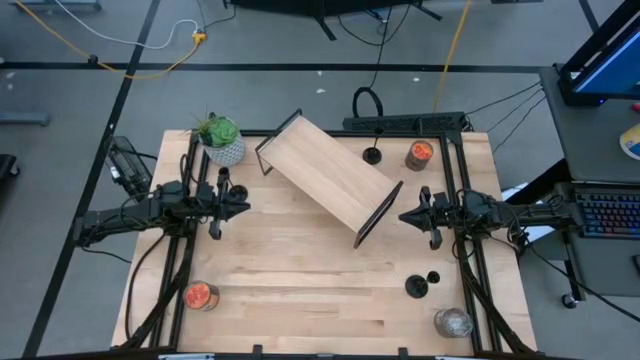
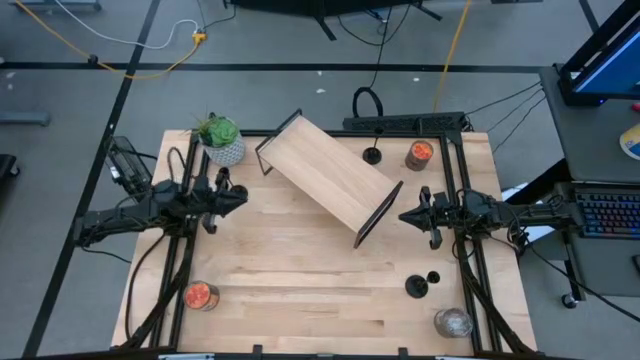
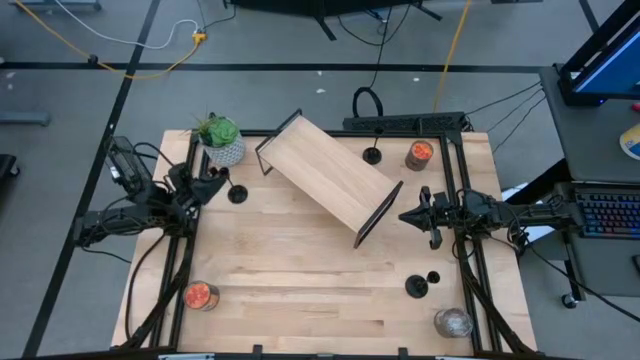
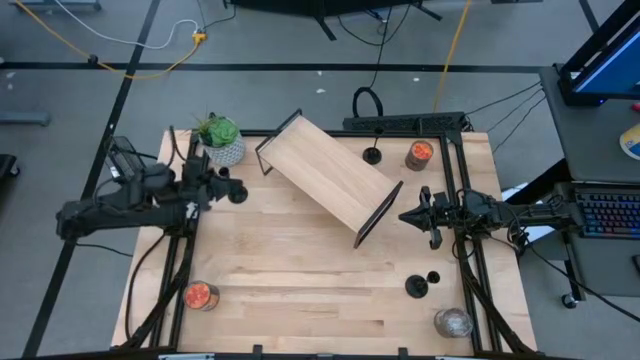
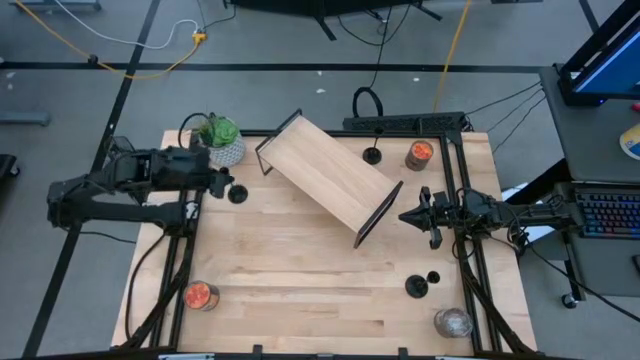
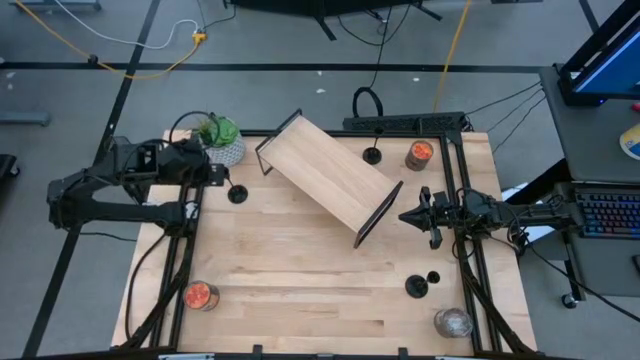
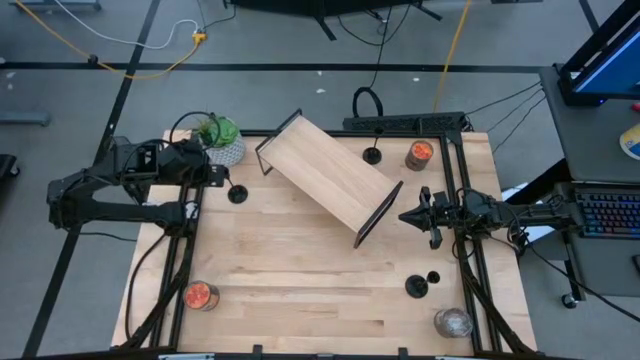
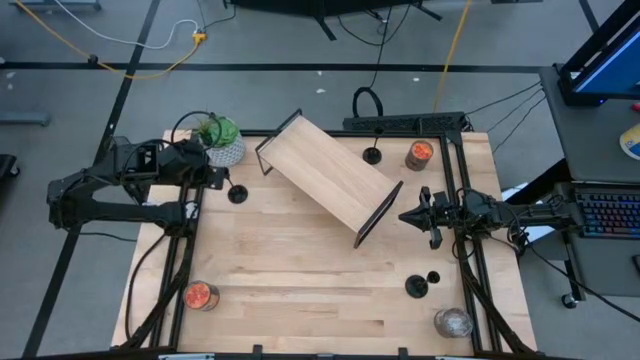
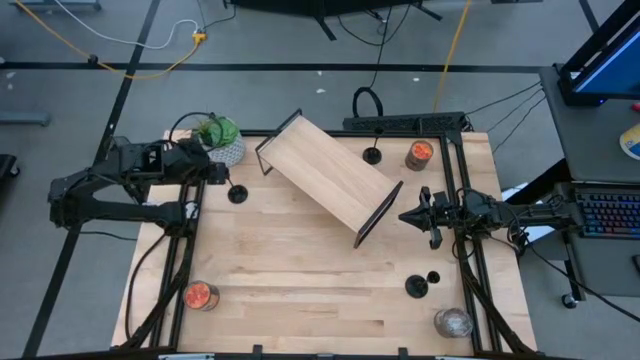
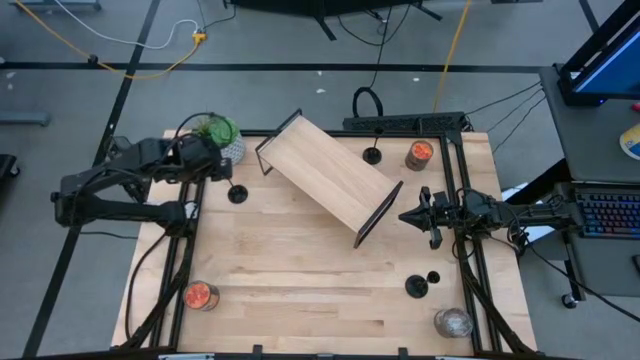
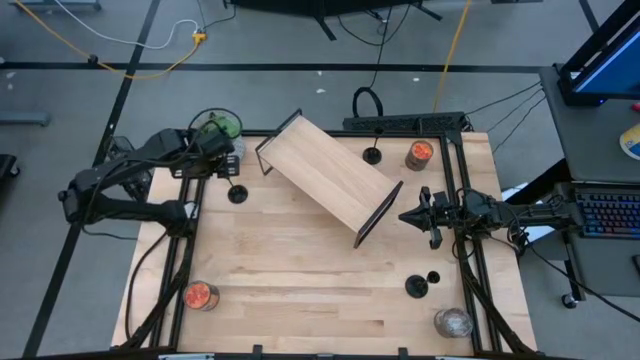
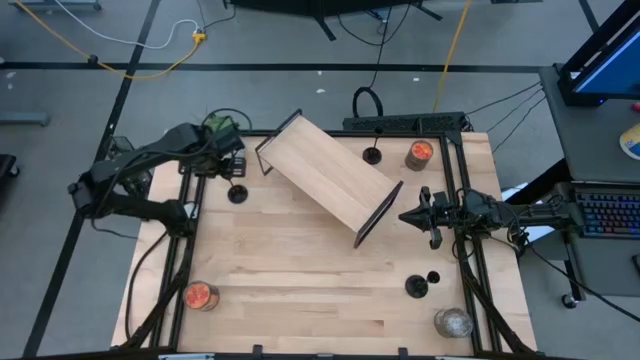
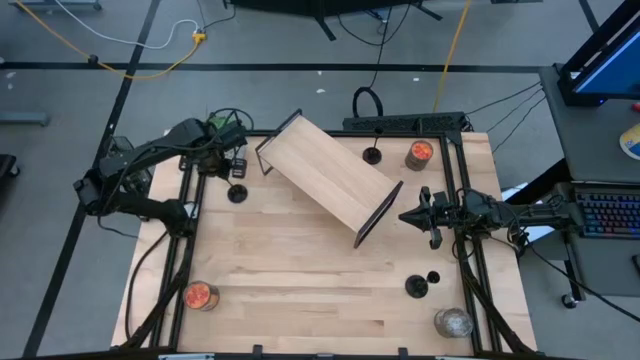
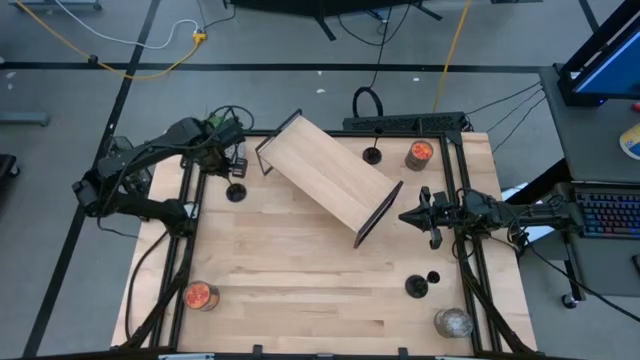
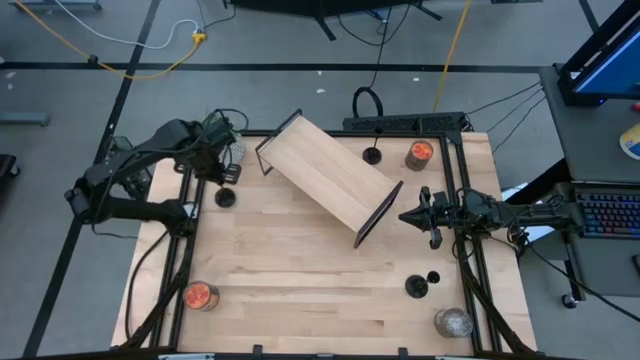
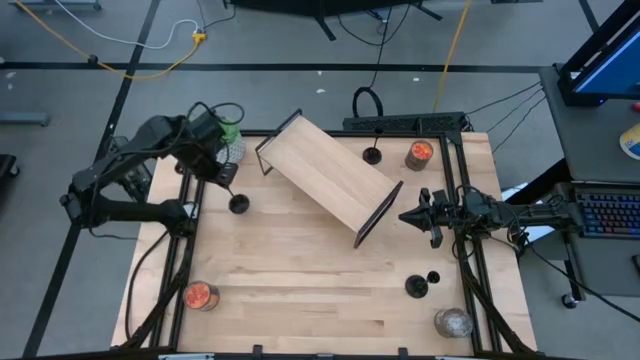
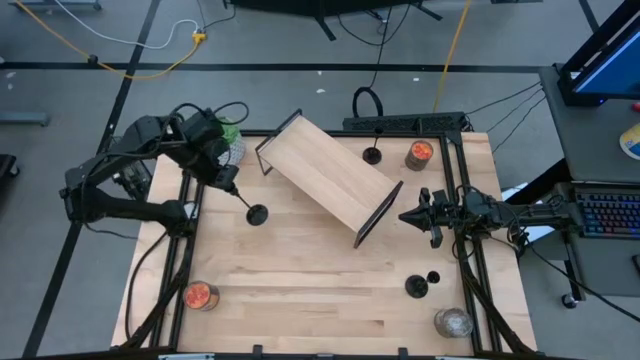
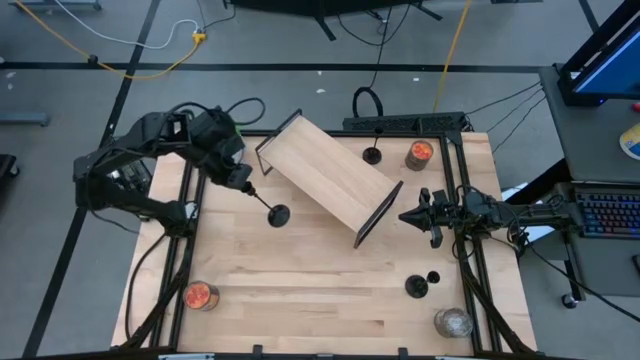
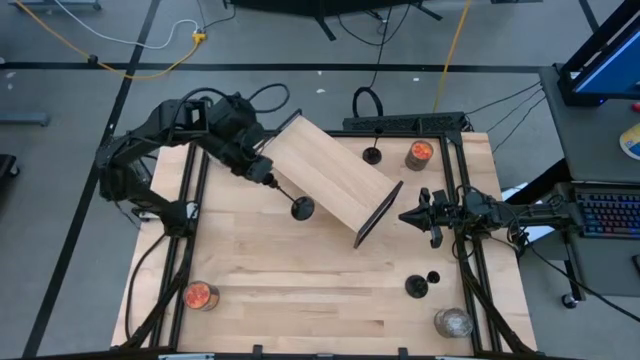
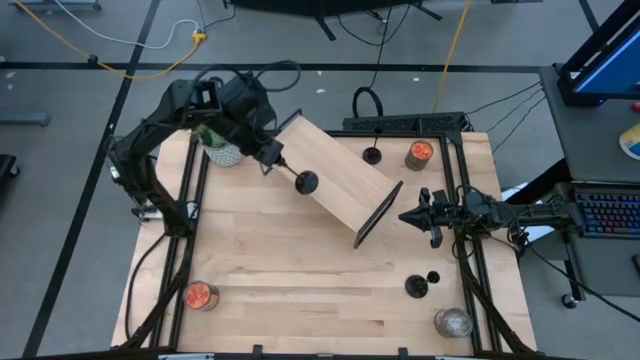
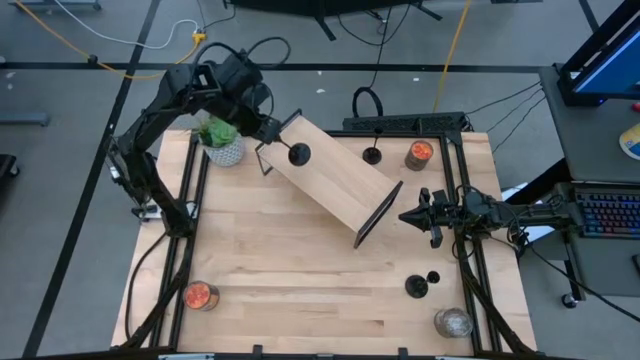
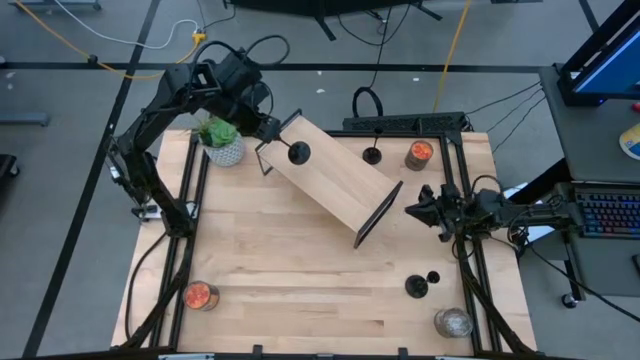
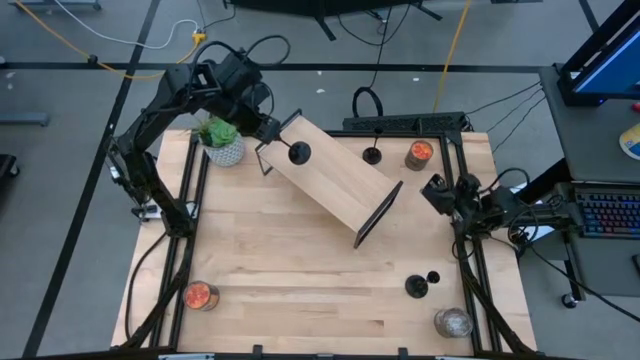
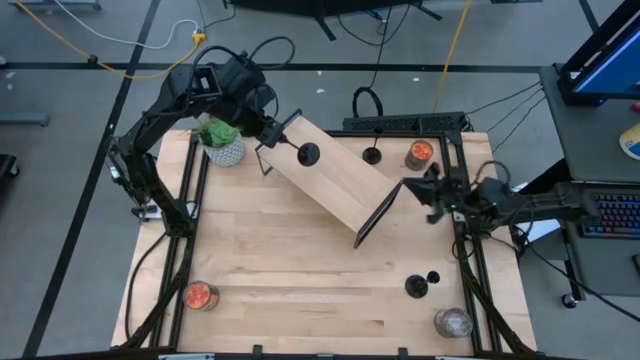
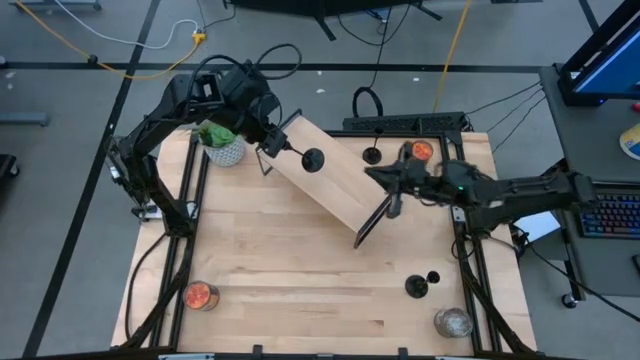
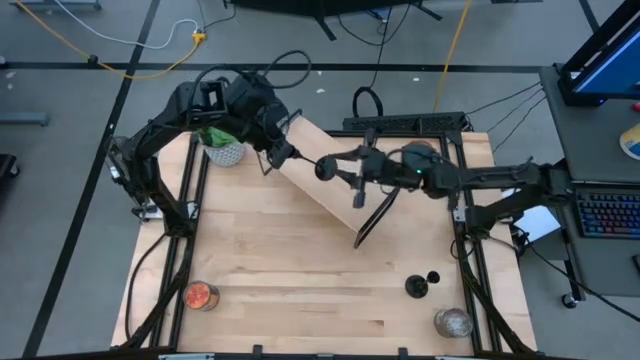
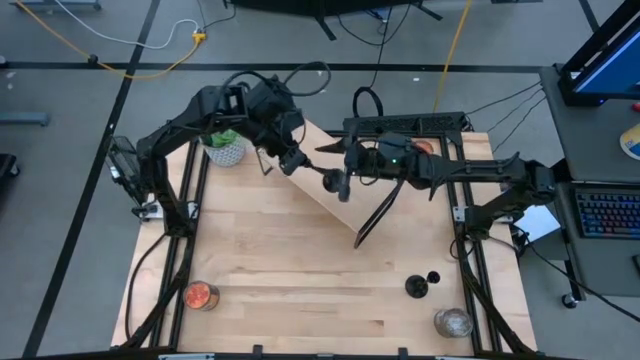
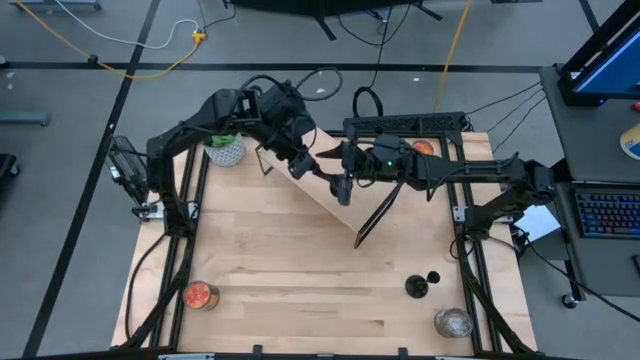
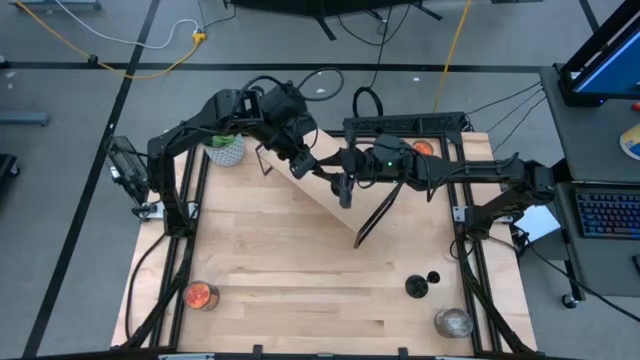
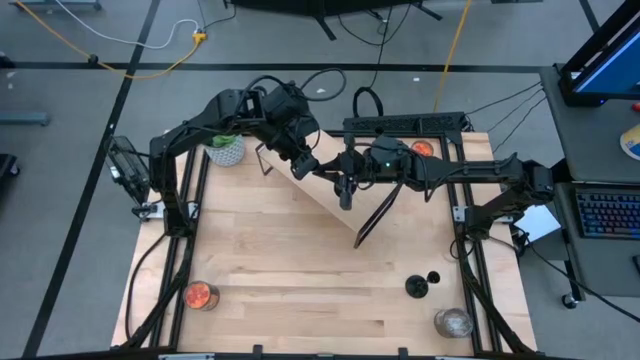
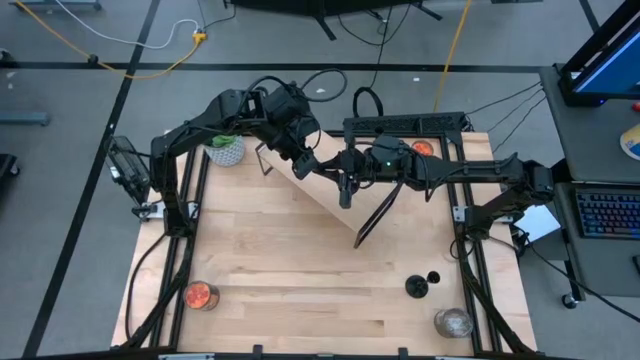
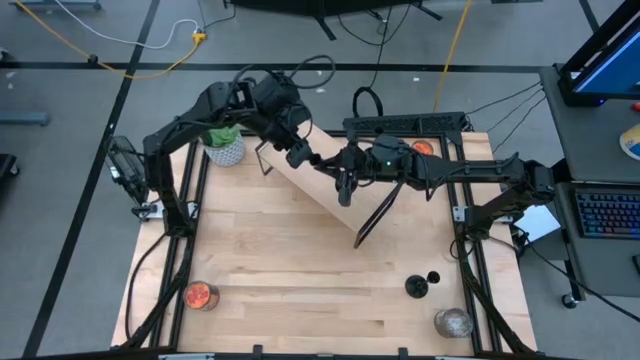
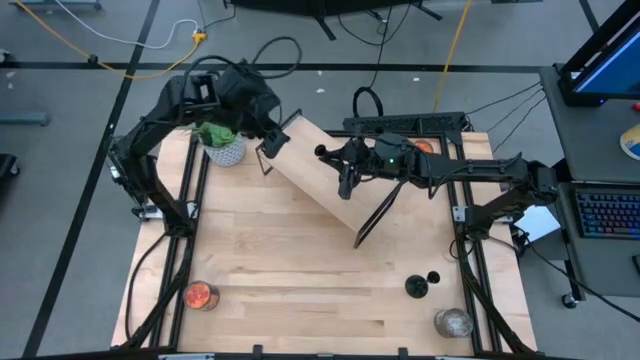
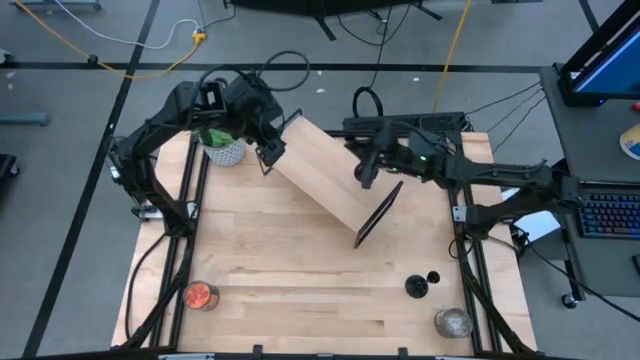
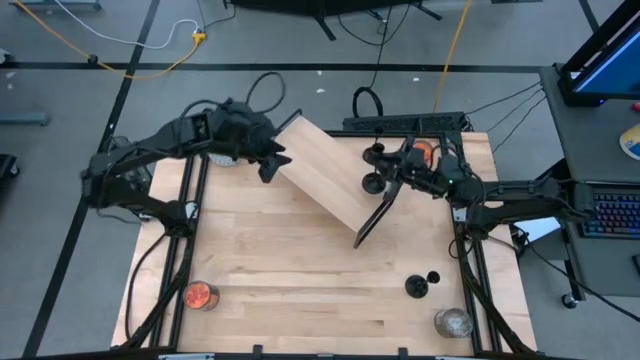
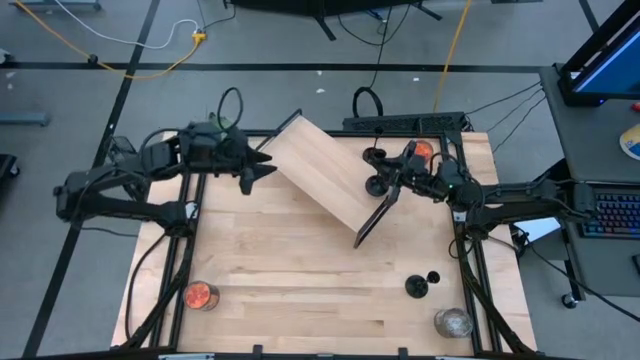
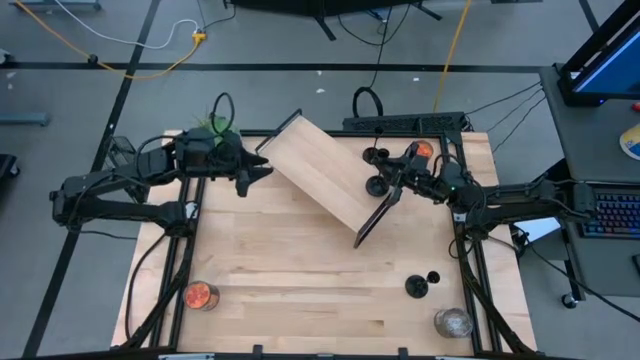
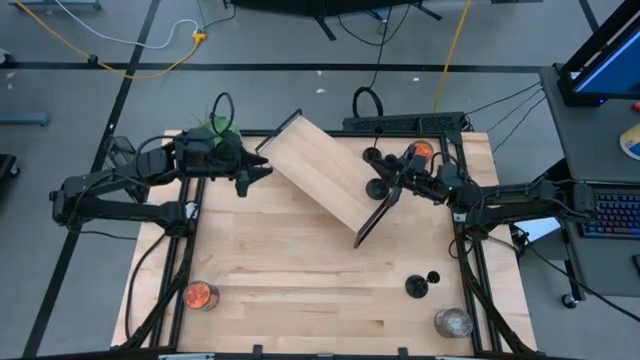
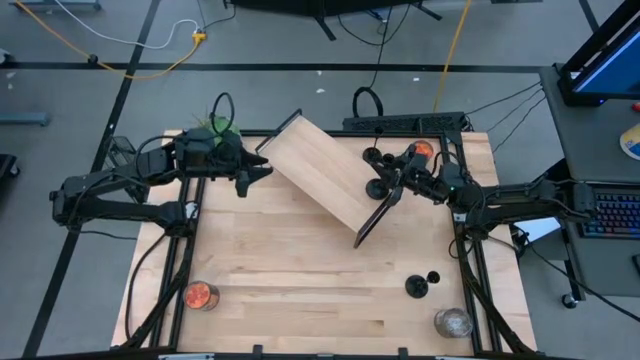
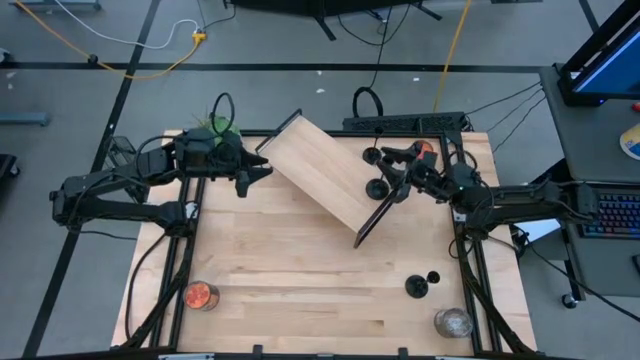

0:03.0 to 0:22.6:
Task: Pick & Place candle stick holders
Put the left black candle holder on the shelf
